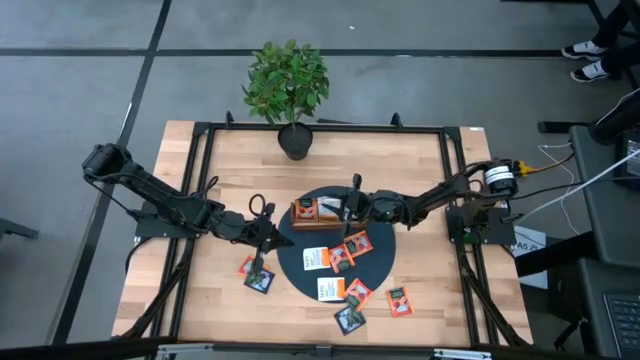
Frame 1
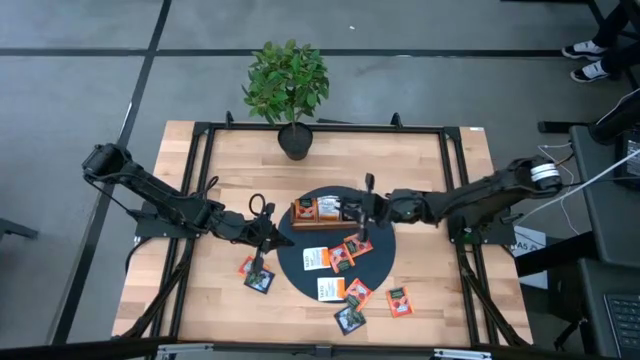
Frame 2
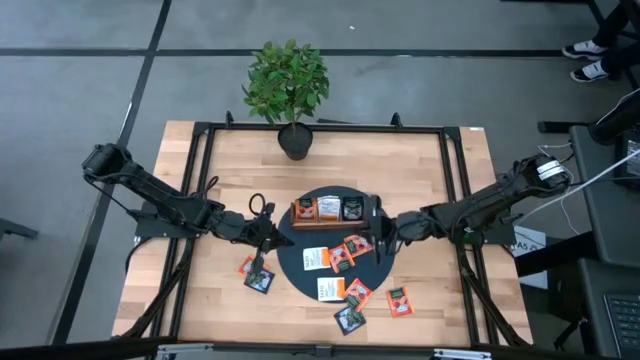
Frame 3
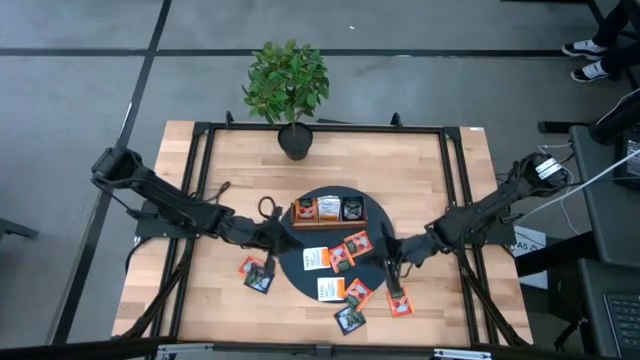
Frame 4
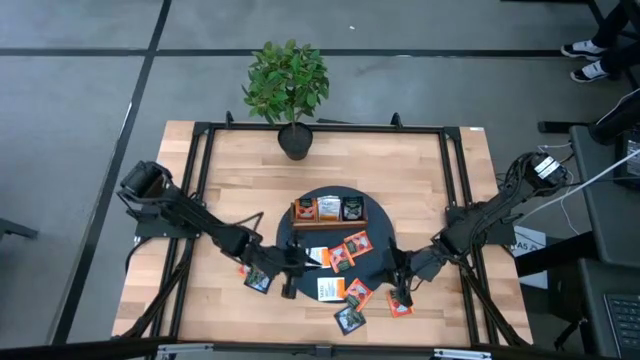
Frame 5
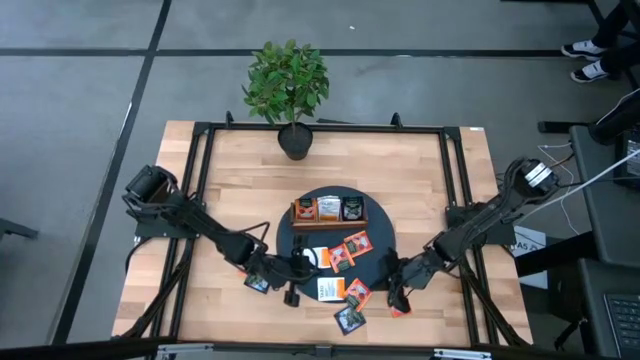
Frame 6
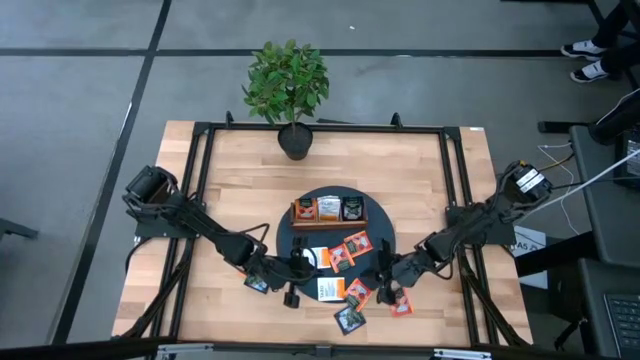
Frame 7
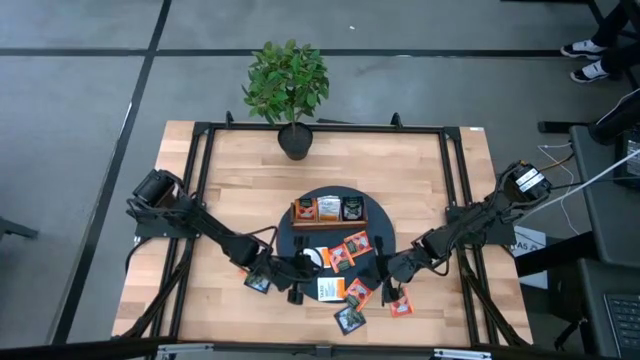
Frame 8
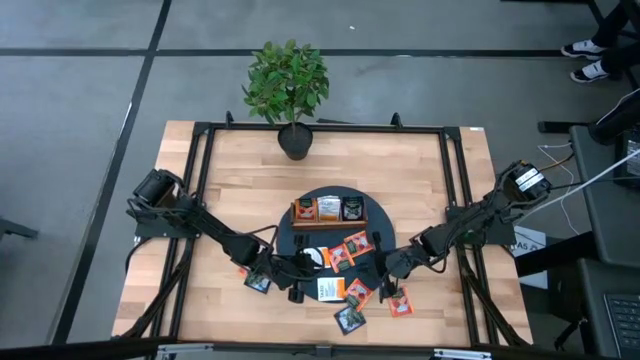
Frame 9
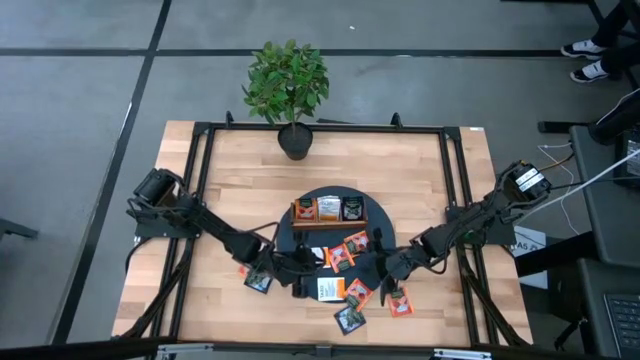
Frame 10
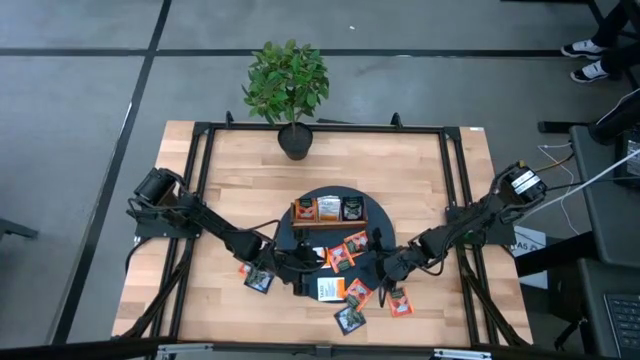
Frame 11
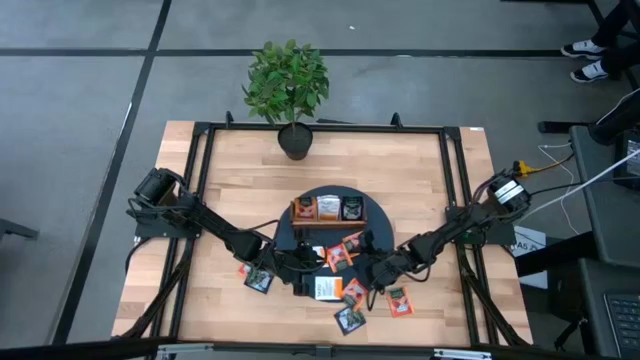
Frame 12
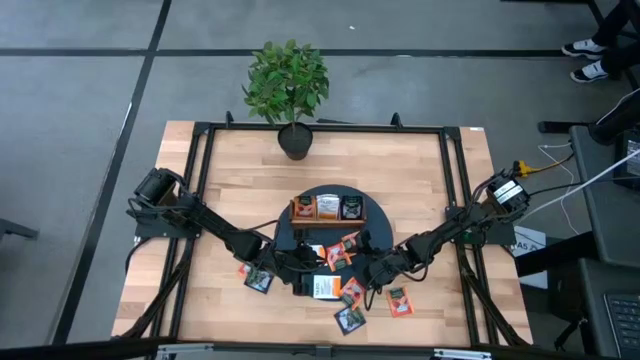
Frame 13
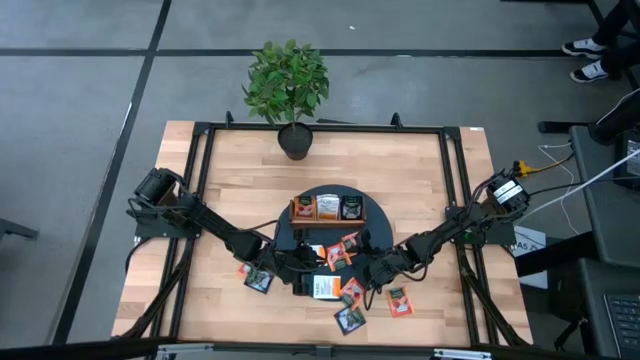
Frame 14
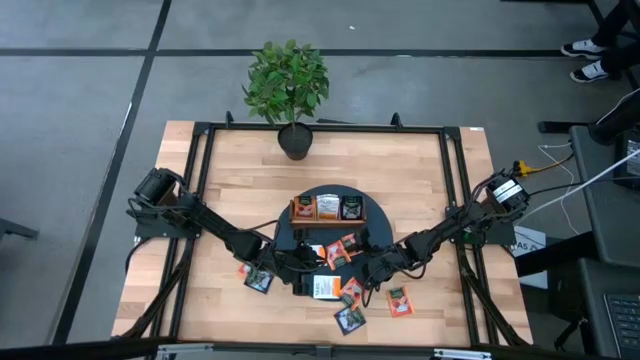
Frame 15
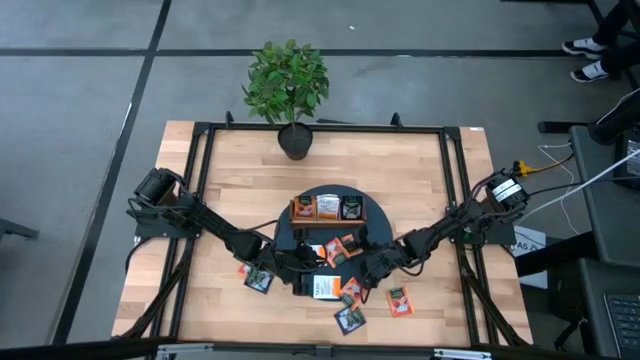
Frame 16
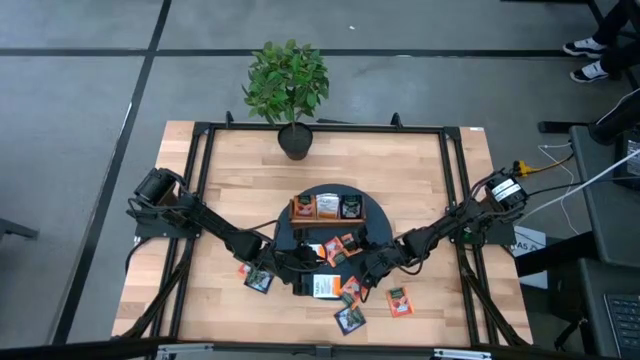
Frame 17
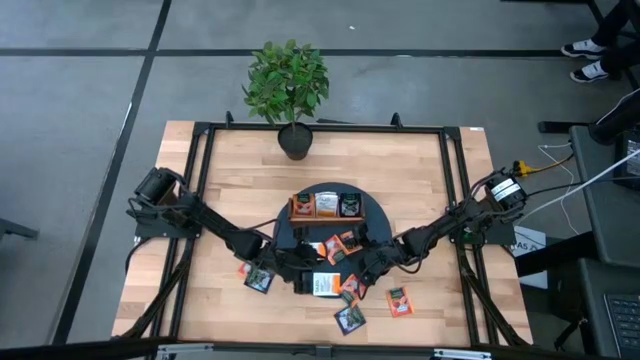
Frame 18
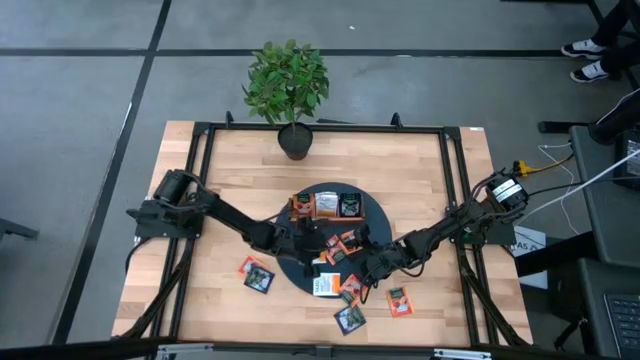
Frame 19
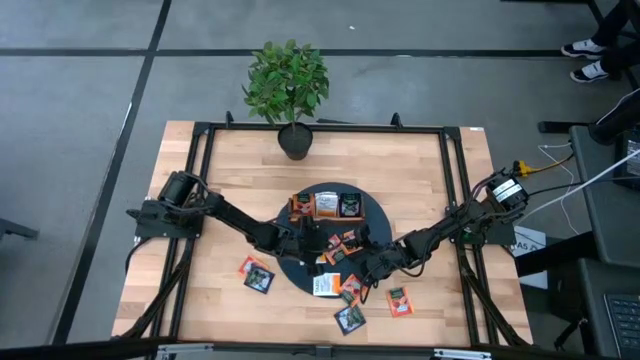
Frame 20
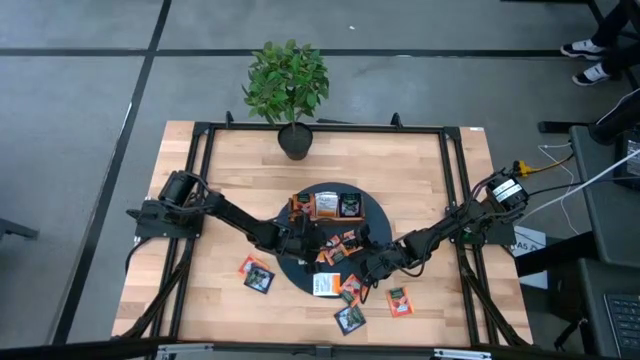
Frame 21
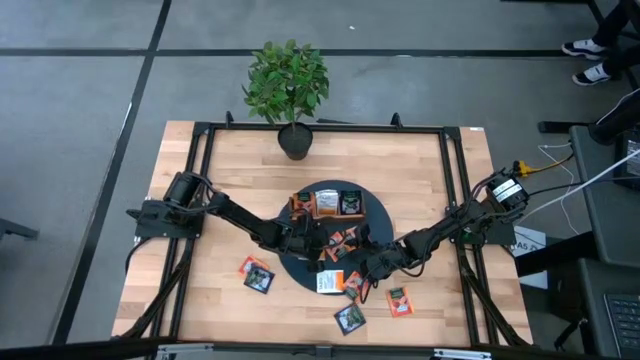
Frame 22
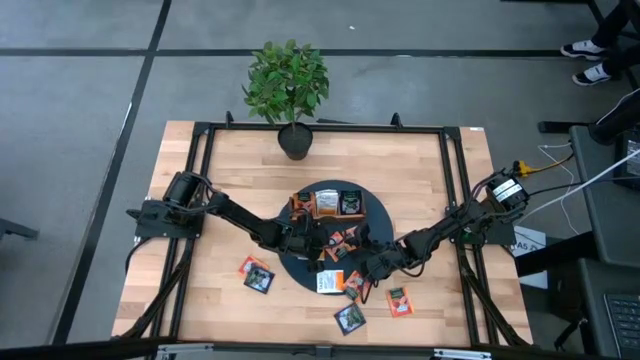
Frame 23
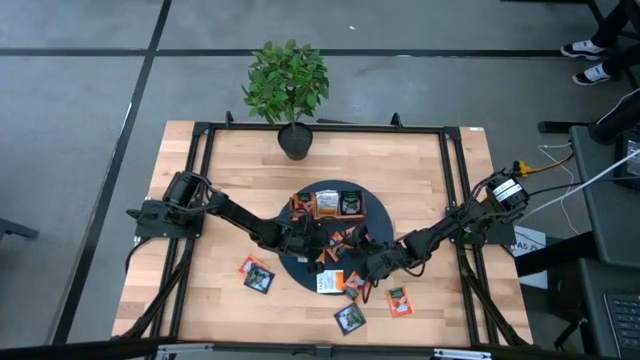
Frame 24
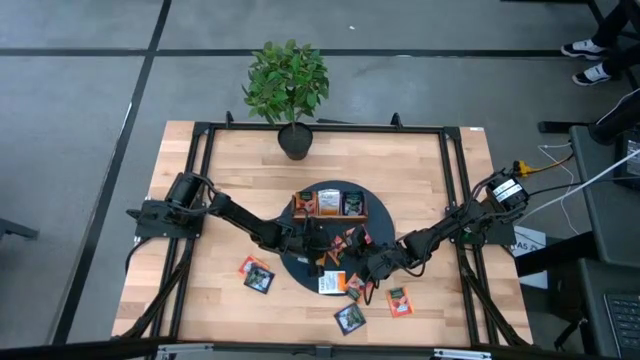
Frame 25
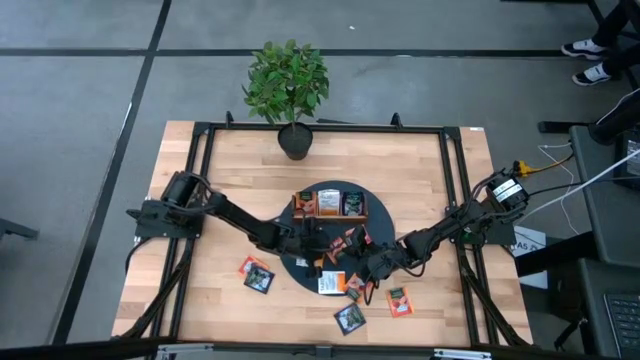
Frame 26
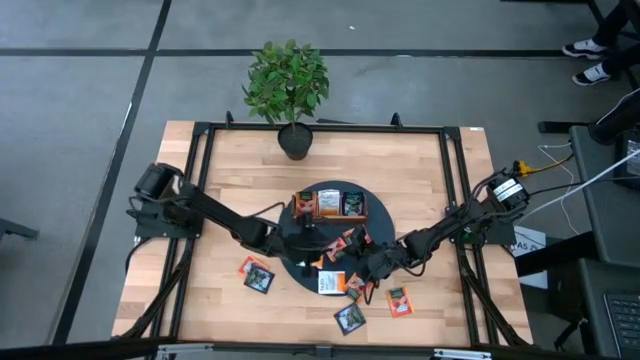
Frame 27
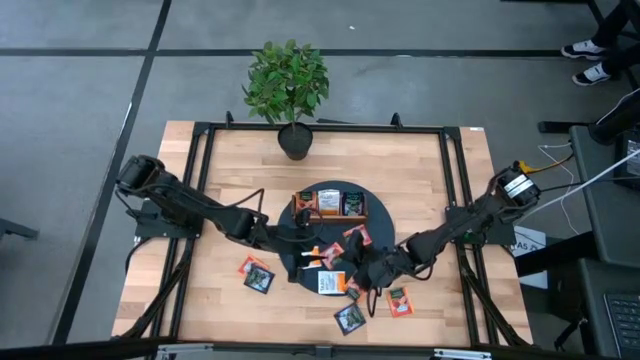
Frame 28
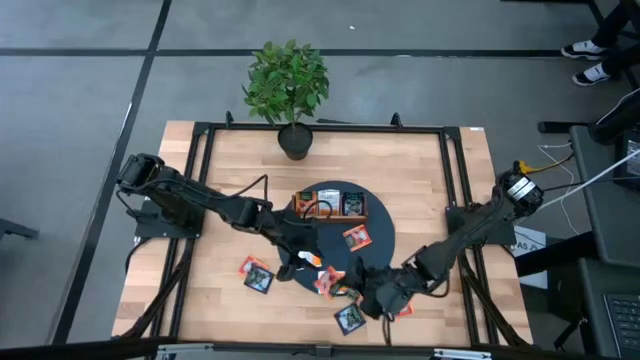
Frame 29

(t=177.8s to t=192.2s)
Task: Pick & Place Tea
Put the orange tea bag into the left side of the wooden organizer

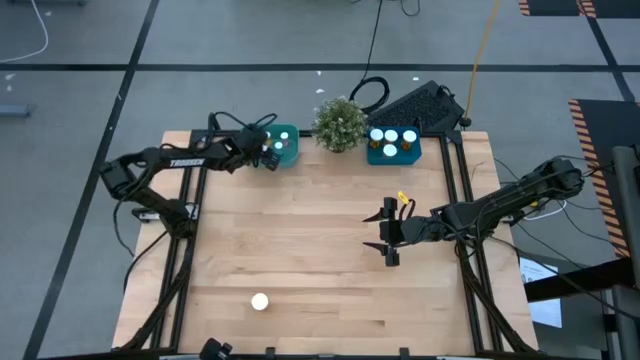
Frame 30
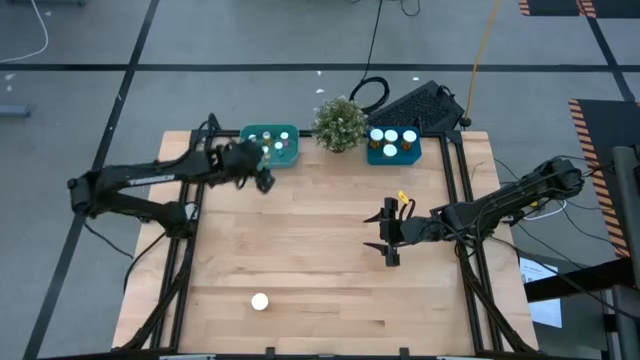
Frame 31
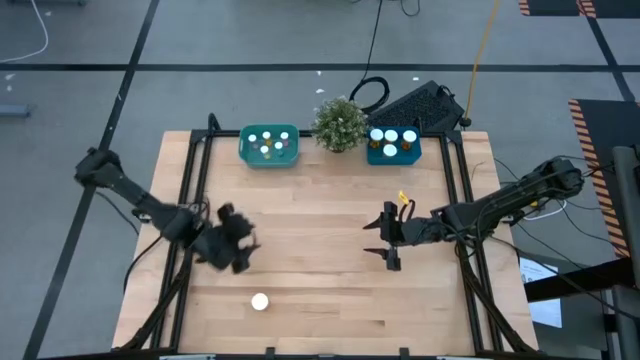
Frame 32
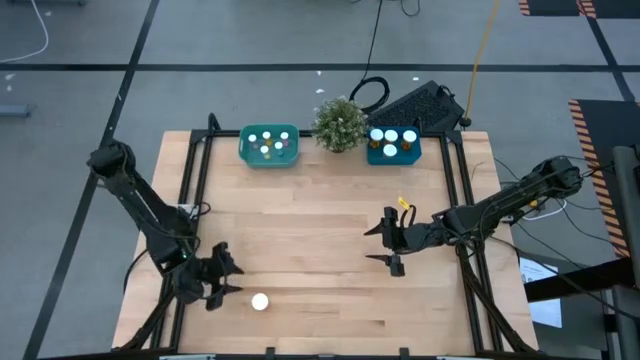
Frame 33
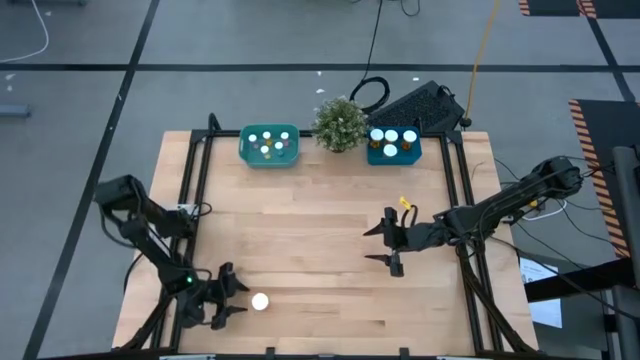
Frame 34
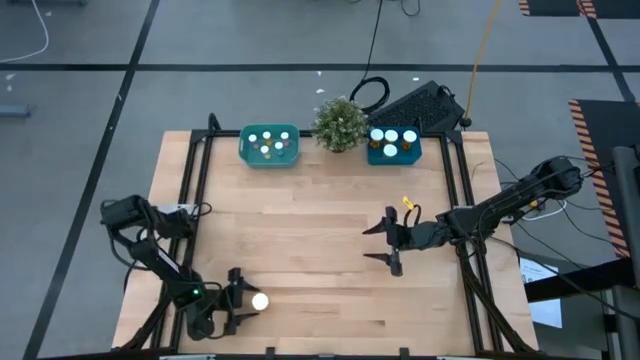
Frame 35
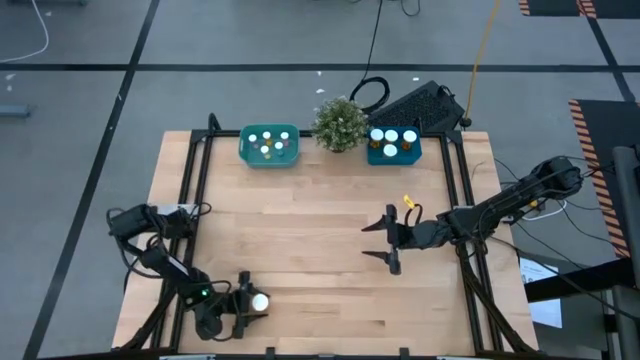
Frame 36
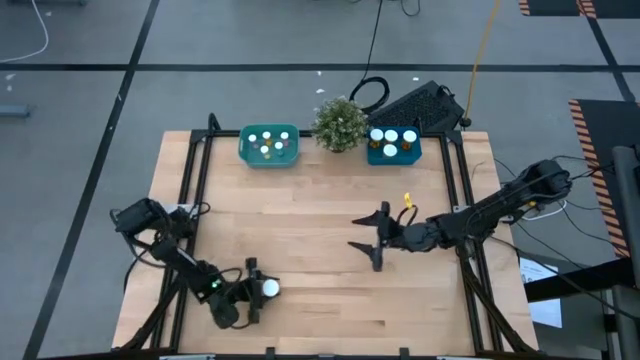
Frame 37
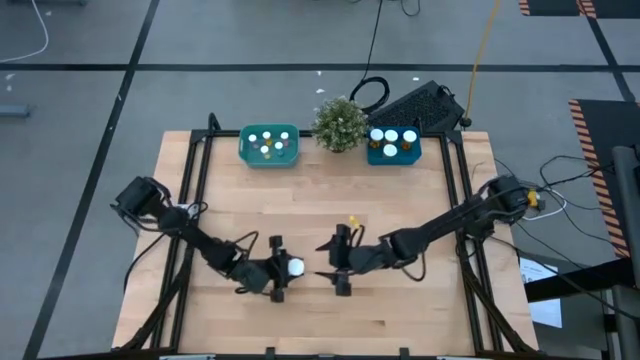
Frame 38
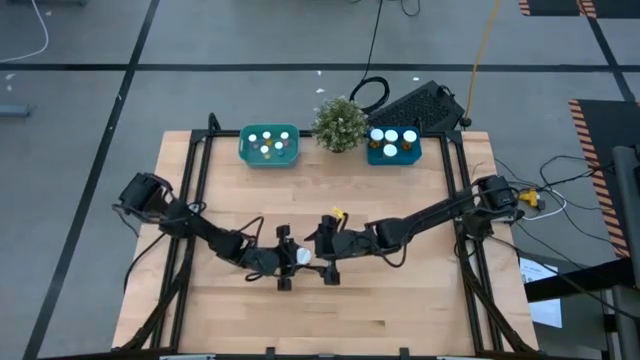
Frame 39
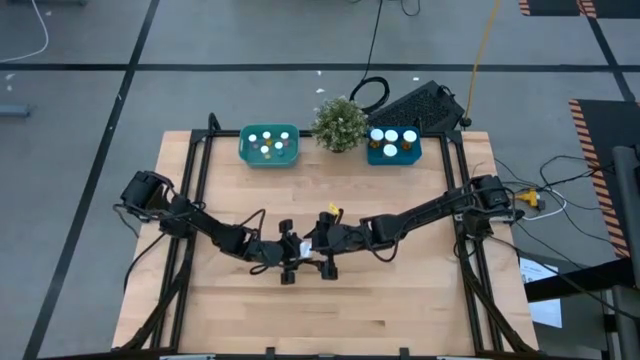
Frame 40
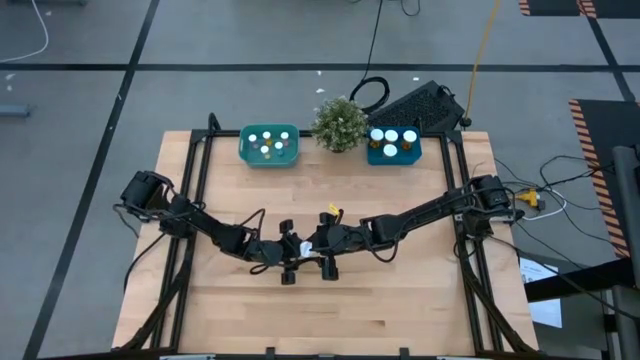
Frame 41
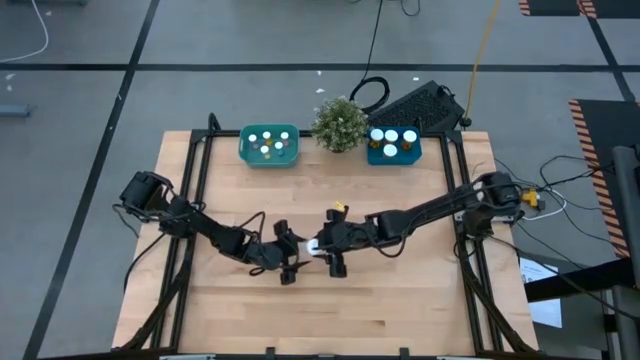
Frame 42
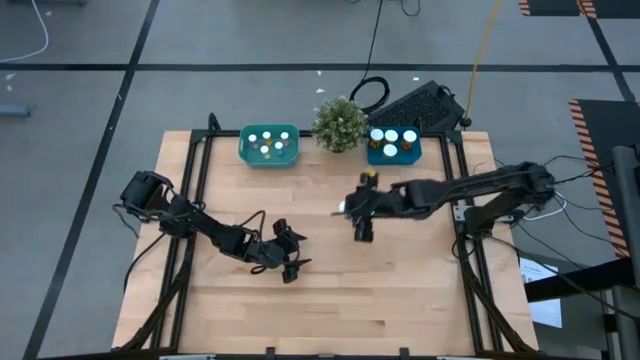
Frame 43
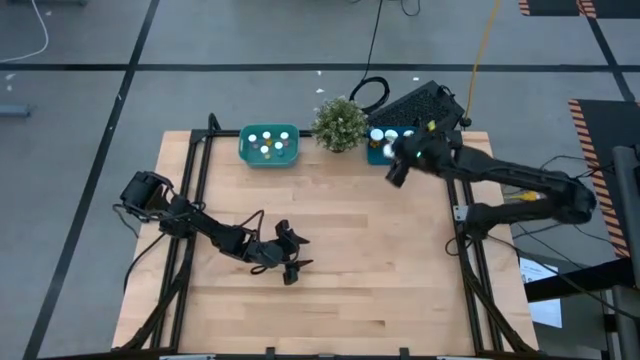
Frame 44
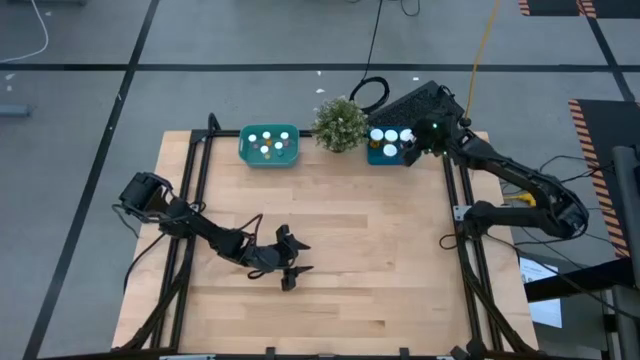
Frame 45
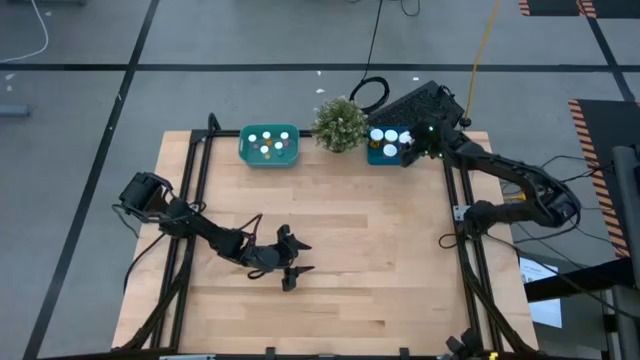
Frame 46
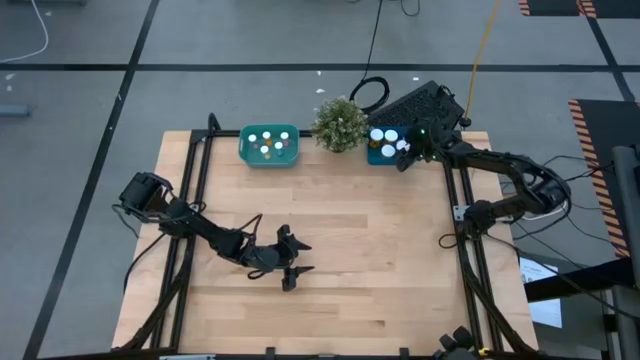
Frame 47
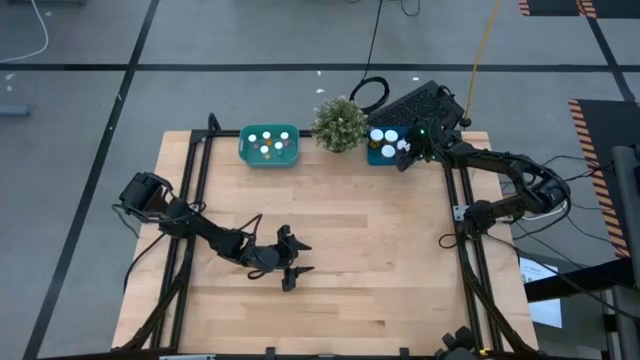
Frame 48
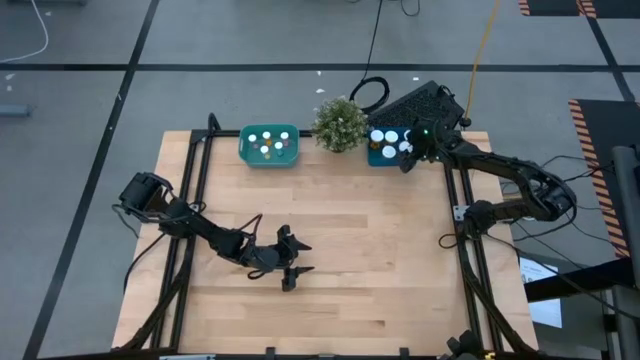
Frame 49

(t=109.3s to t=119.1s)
Task: Pick and place medicine bottles into bin by pill shape (circle, oval)
Put the big orange pill bottle into the blue bin
